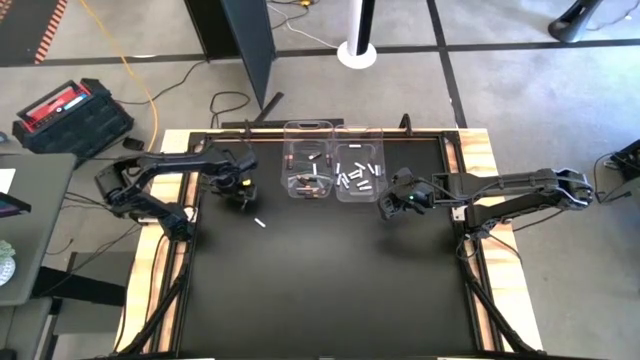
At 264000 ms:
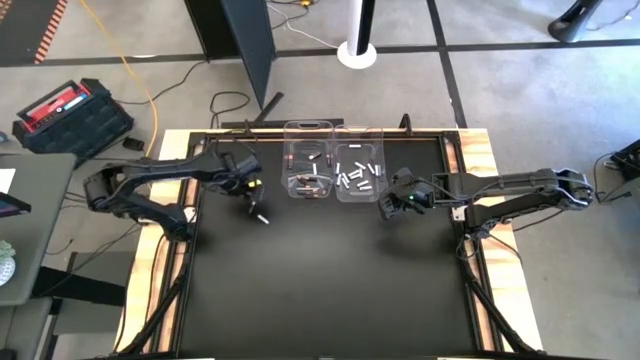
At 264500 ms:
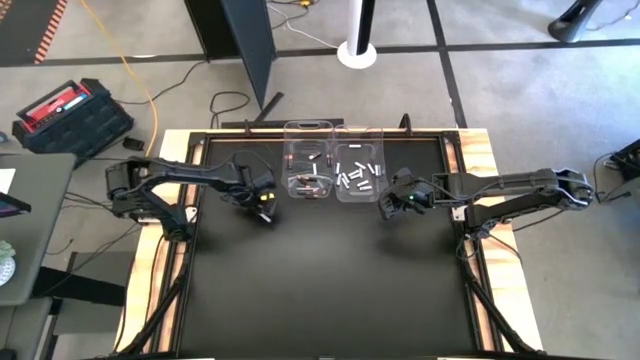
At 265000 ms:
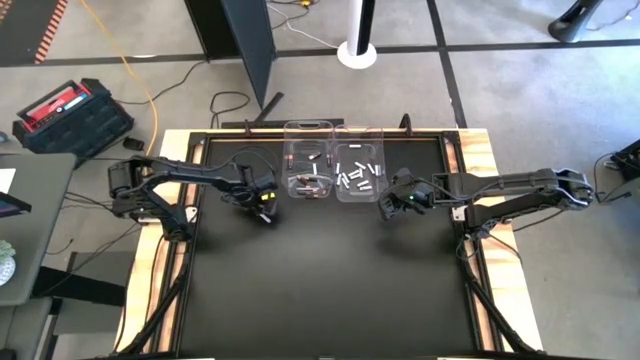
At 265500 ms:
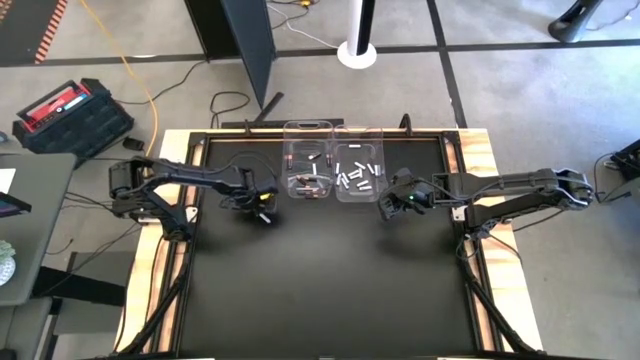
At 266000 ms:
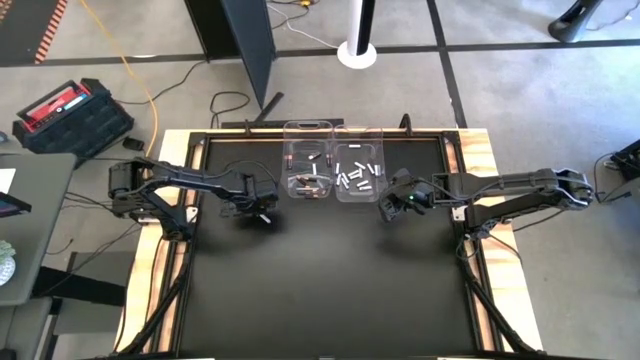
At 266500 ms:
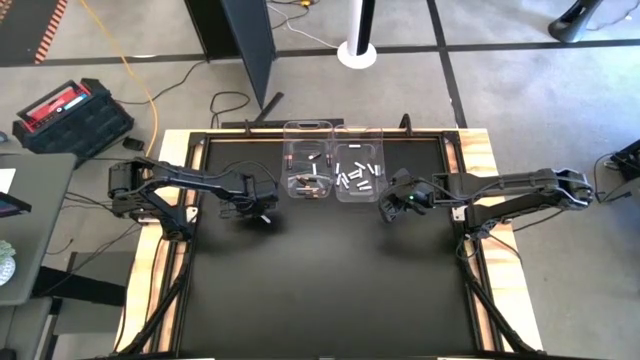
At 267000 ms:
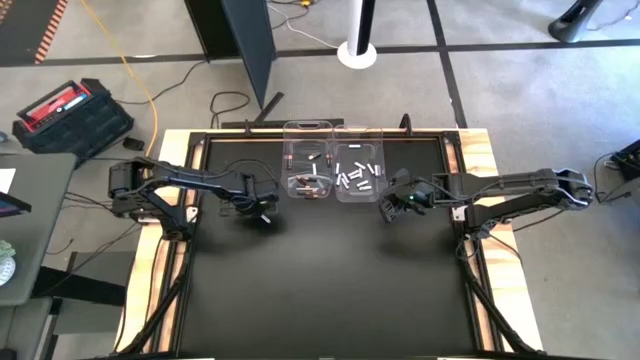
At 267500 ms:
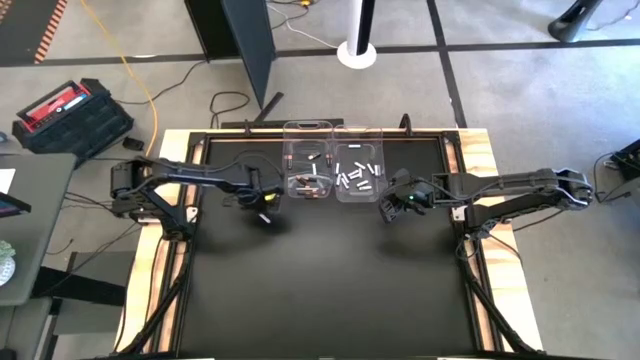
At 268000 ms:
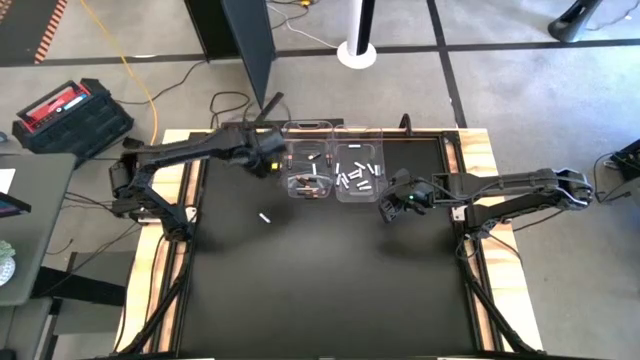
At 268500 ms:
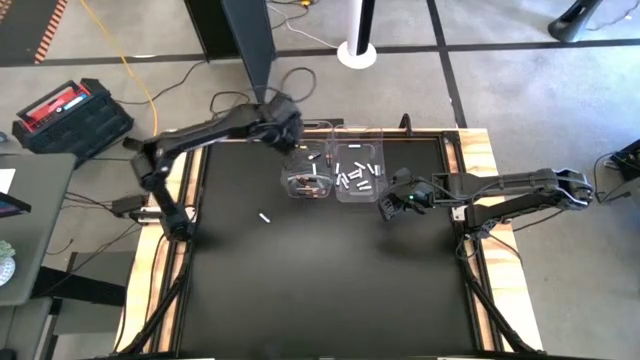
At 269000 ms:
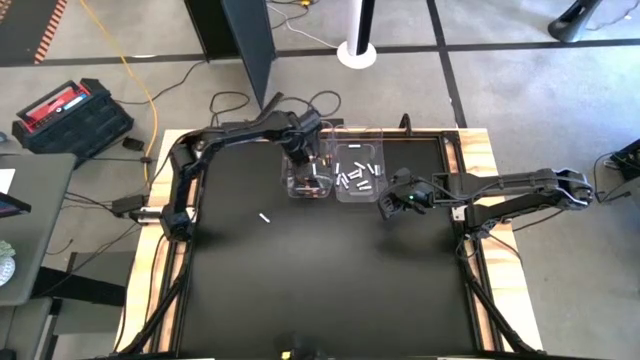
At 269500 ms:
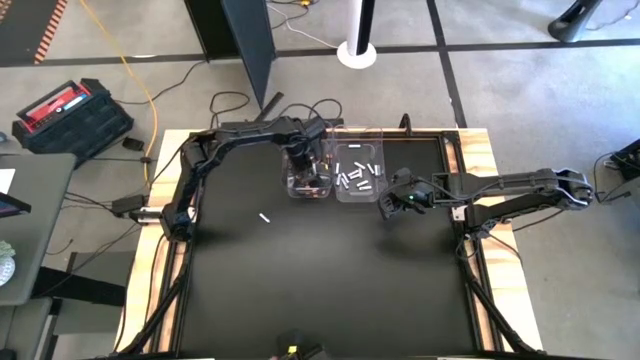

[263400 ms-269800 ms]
Task: Sort batteries
Put the black battery into the left transparent bin

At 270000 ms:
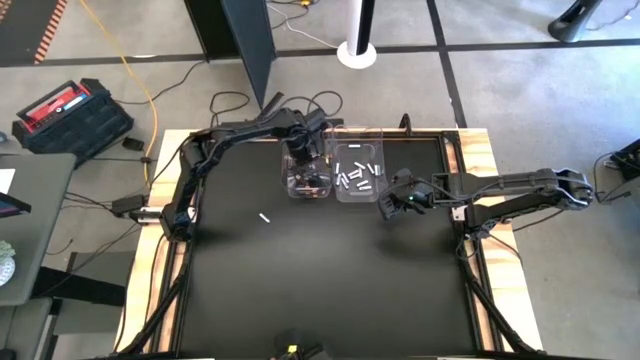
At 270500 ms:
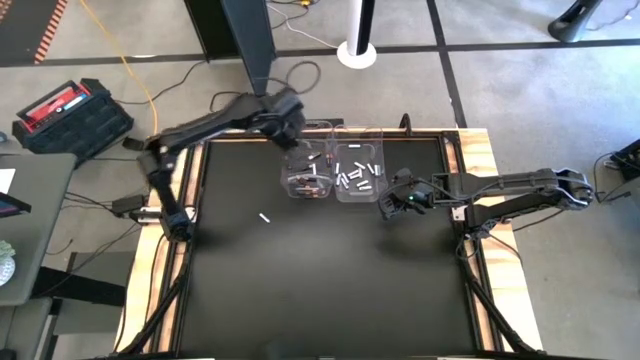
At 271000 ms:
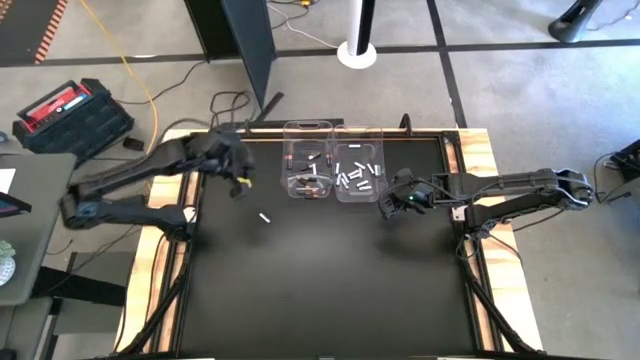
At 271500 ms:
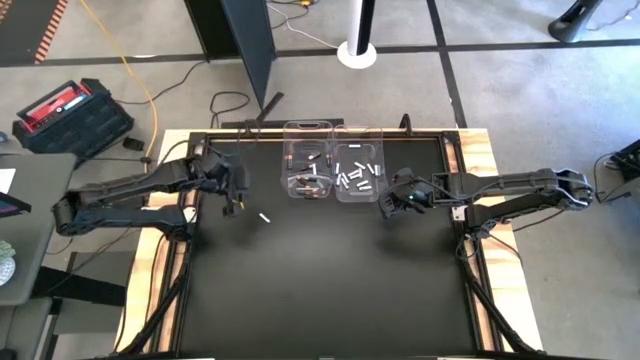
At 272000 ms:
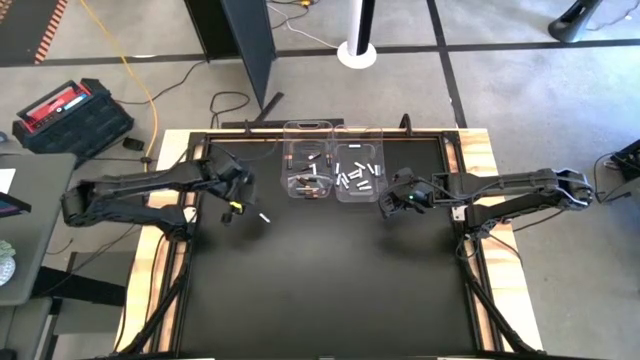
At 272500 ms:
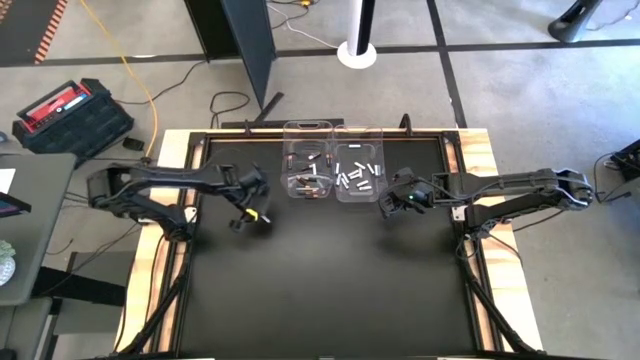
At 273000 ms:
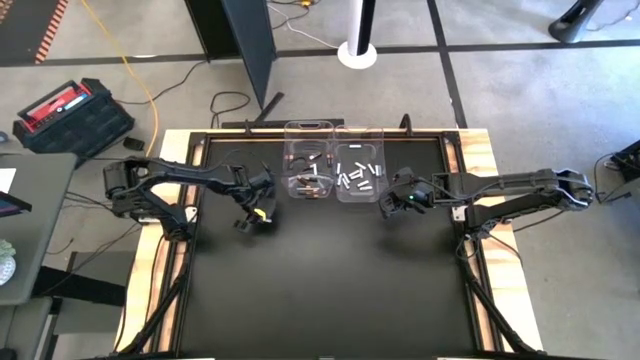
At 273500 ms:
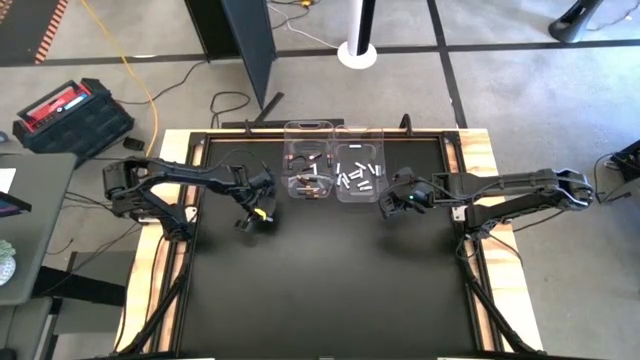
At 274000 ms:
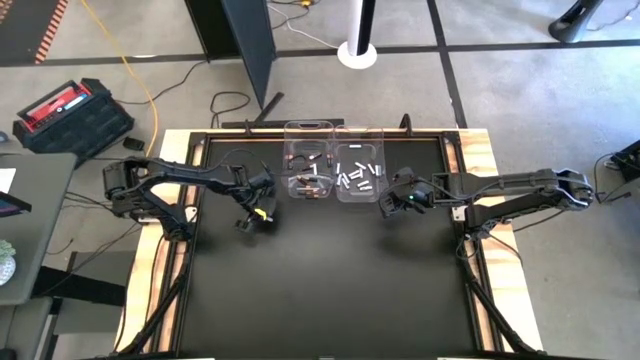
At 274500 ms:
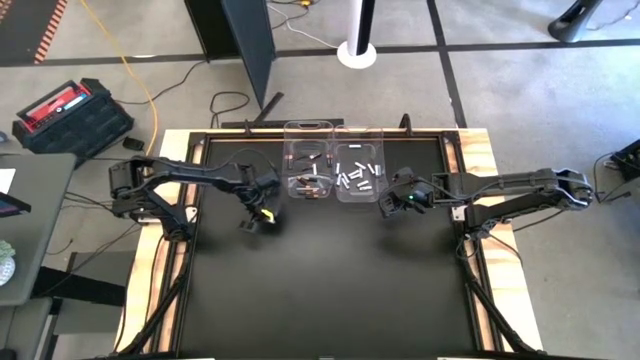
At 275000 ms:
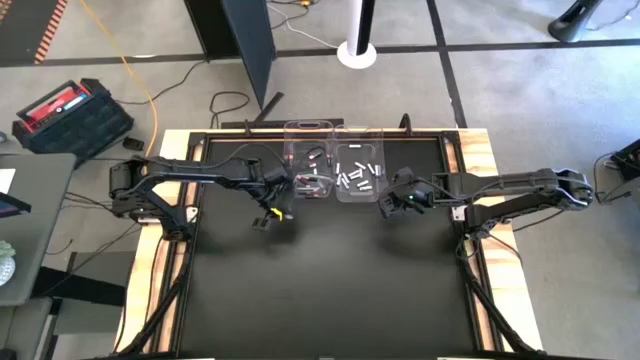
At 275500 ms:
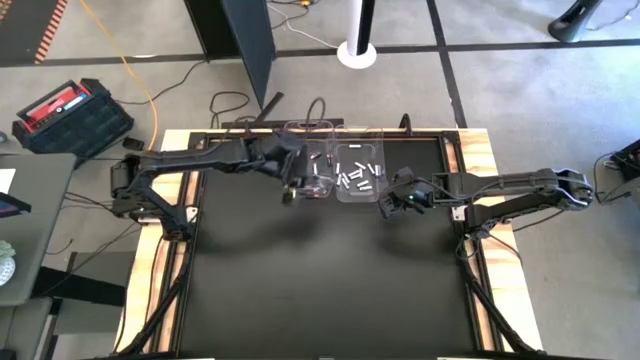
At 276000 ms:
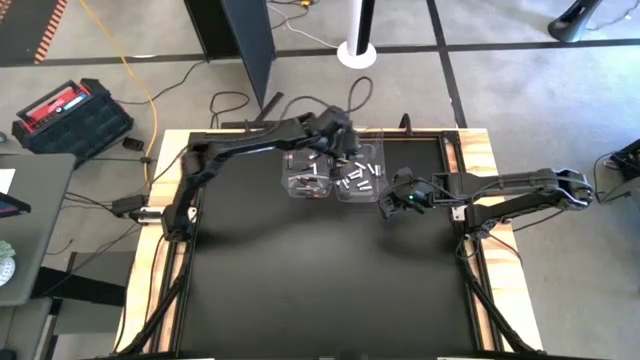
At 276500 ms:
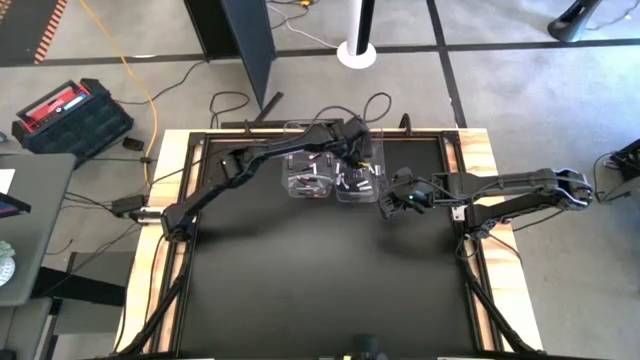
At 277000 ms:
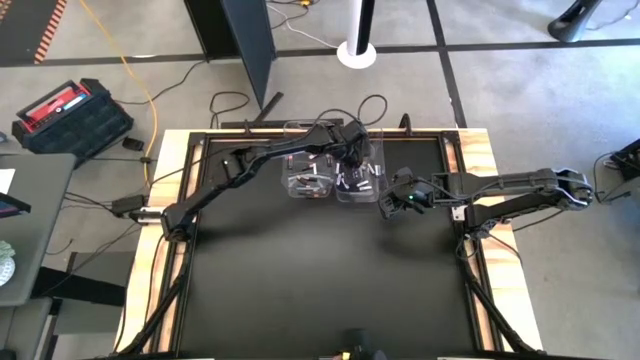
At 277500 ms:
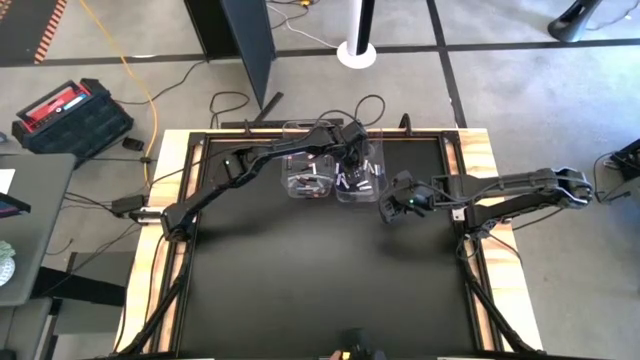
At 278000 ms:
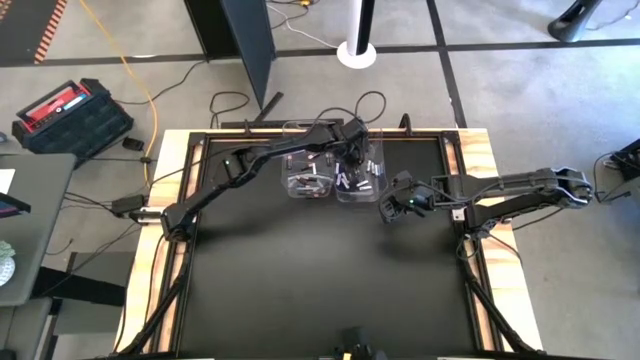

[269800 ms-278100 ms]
Put the white battery into the right transparent bin

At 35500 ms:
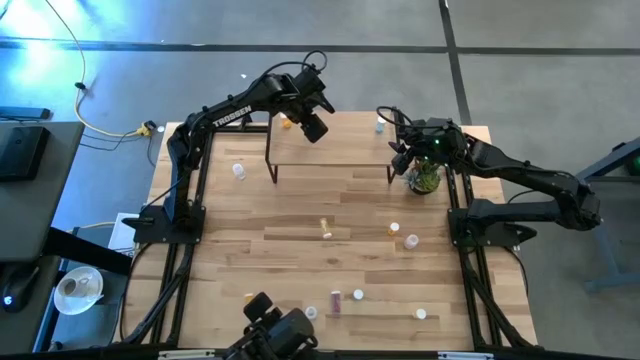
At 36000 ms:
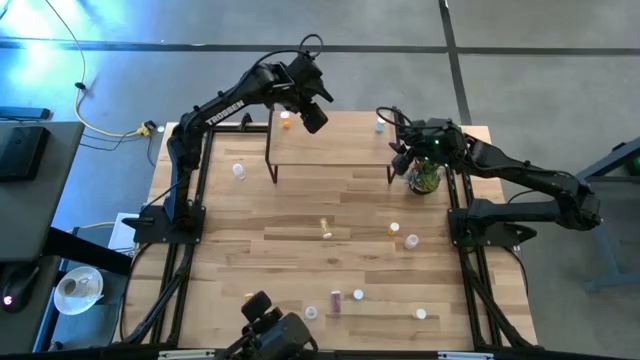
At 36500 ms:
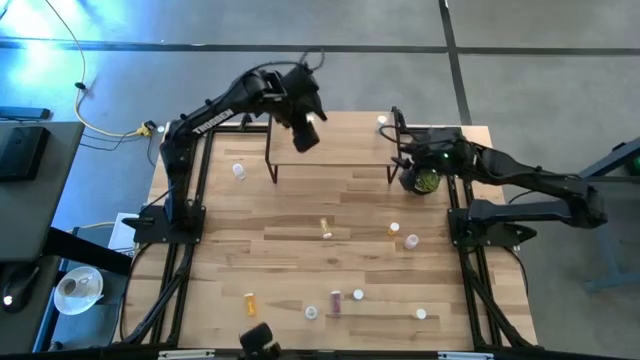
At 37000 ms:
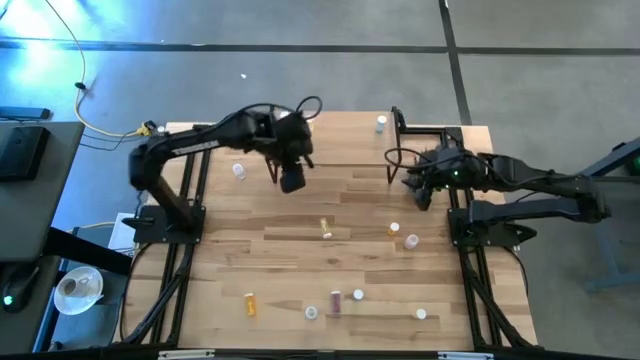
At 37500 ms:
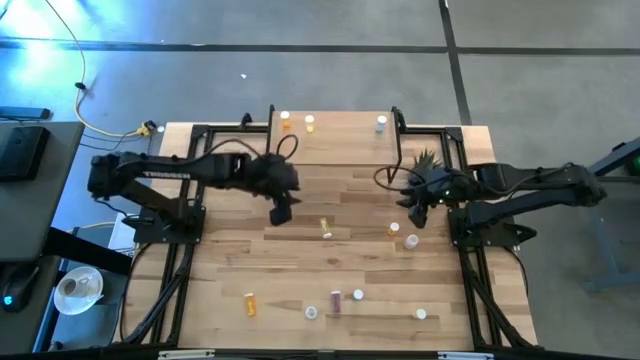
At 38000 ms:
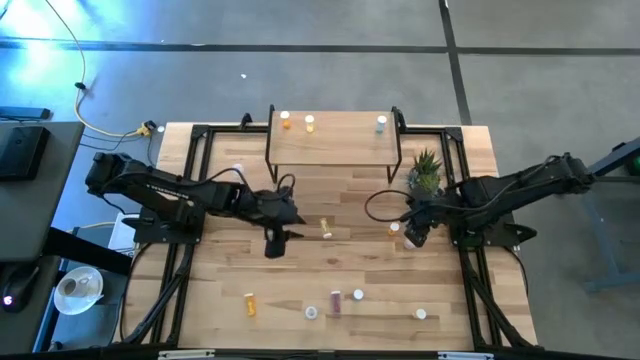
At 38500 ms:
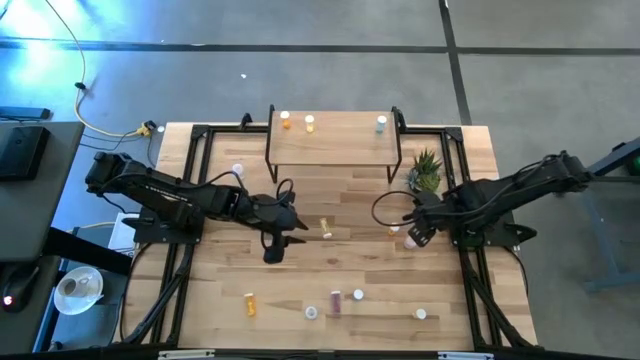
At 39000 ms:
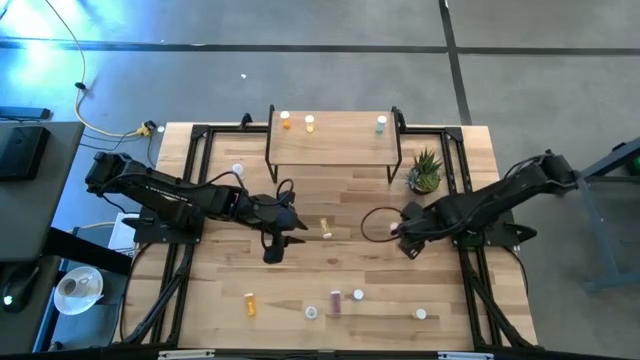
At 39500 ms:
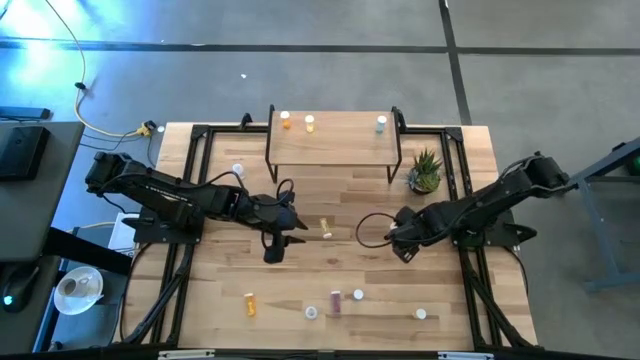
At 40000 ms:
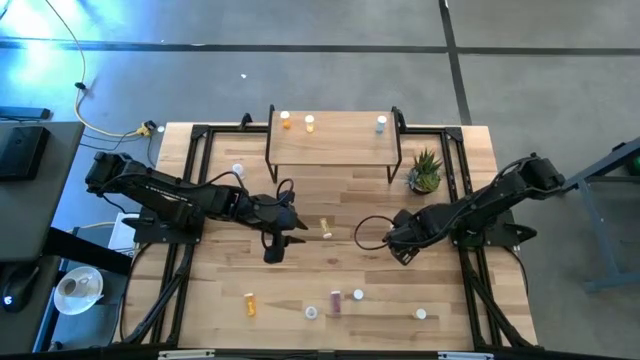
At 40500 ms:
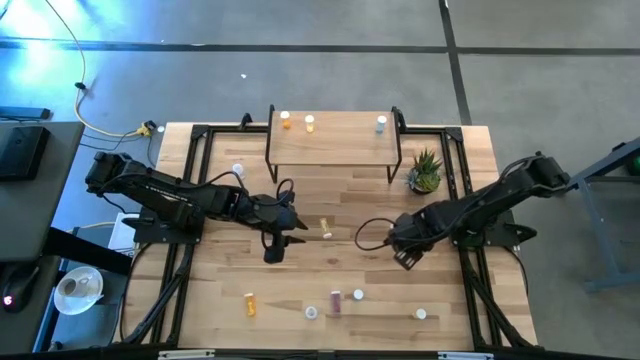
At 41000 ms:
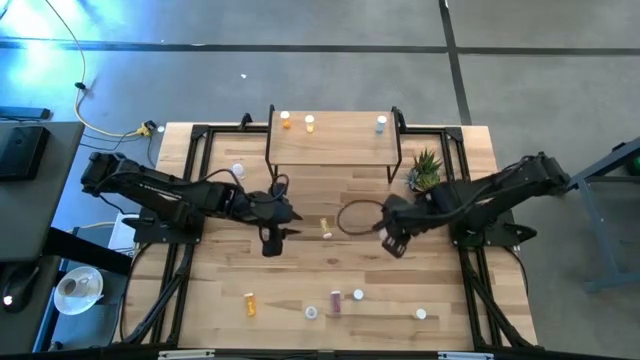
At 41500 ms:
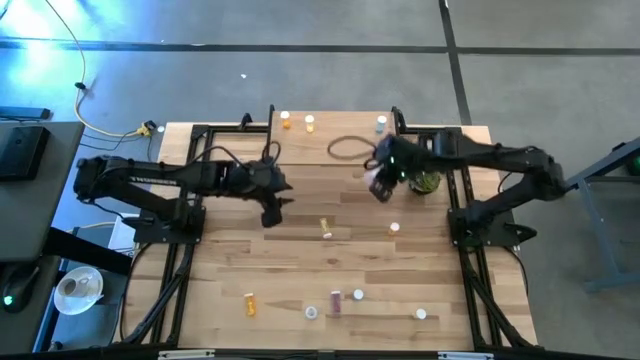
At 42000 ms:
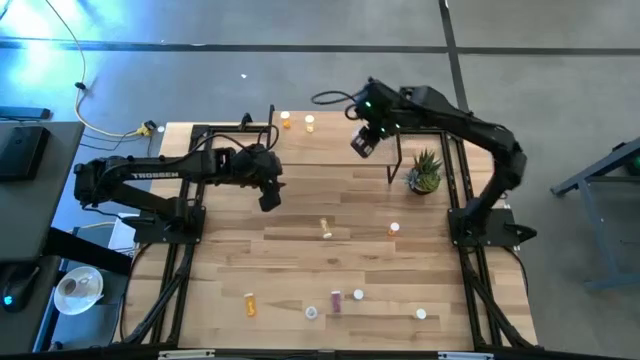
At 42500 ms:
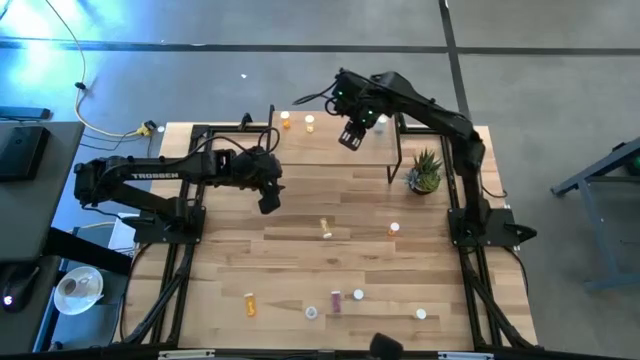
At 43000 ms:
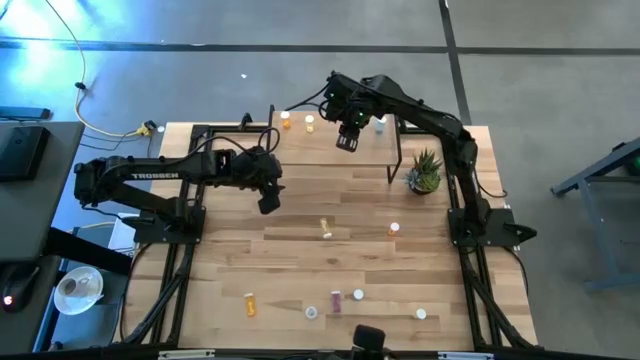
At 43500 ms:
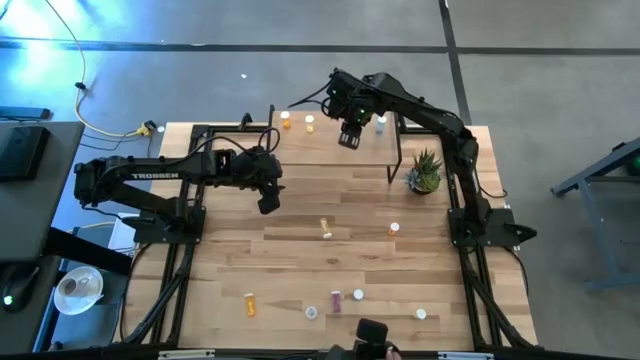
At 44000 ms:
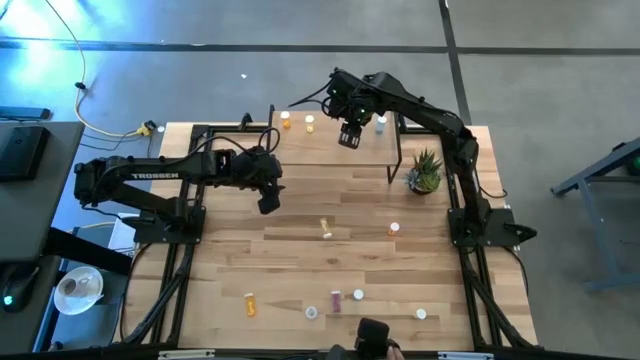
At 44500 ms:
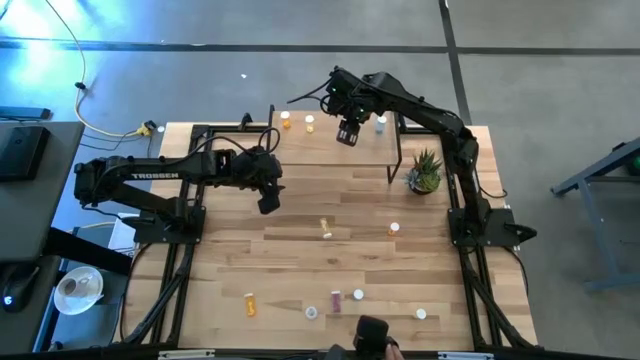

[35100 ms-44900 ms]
Task: Pick and place medicine bottles onto shelf by color
Put the middle white pill bottle on the shelf
